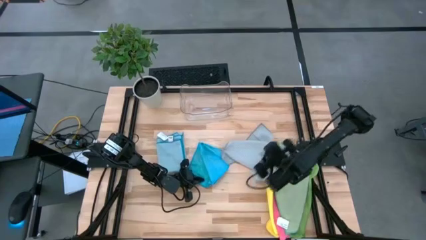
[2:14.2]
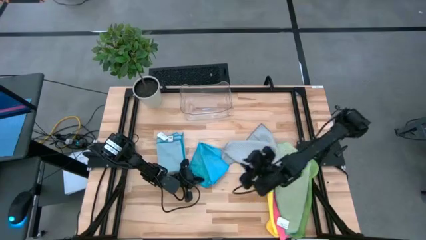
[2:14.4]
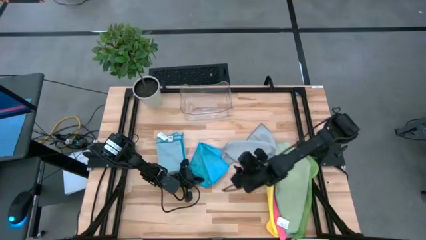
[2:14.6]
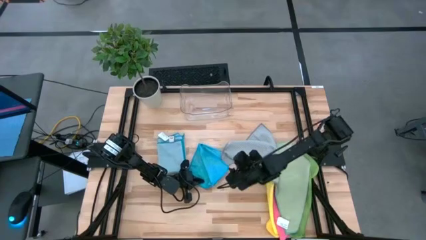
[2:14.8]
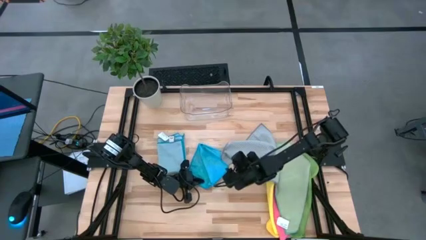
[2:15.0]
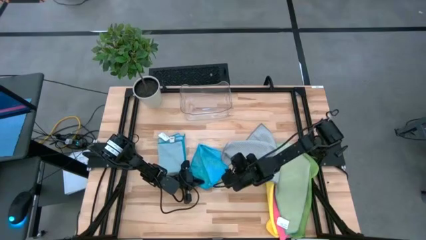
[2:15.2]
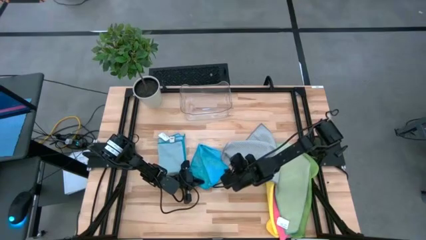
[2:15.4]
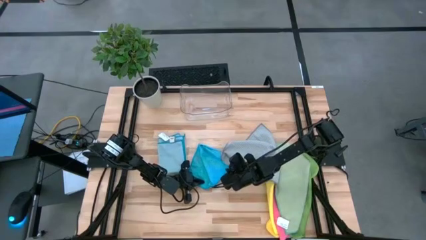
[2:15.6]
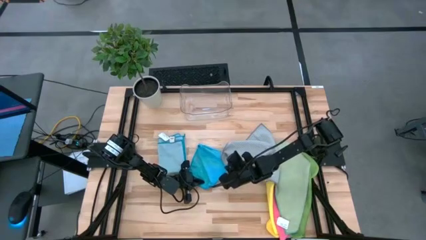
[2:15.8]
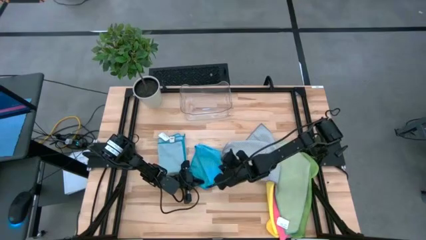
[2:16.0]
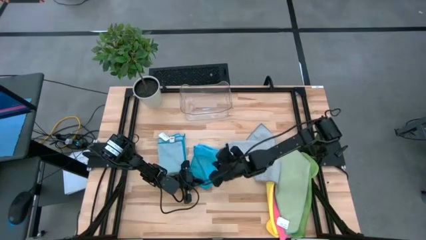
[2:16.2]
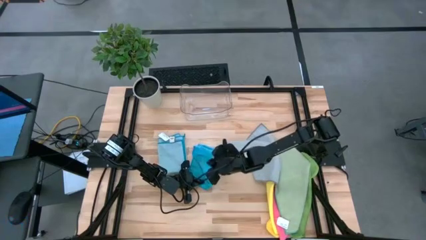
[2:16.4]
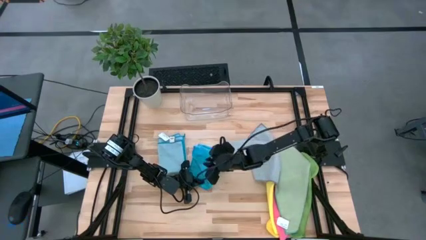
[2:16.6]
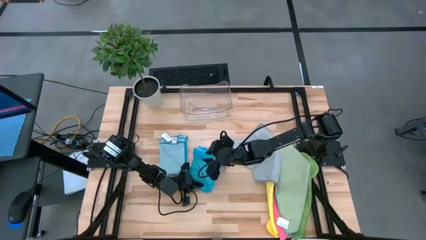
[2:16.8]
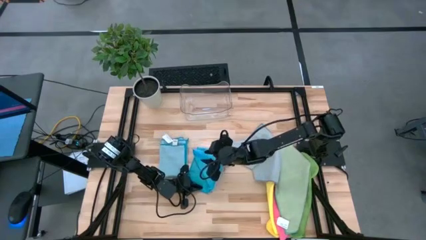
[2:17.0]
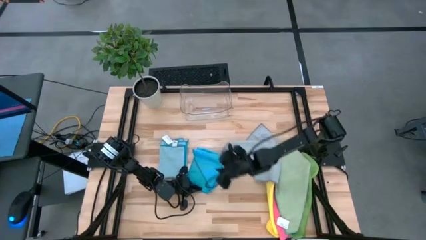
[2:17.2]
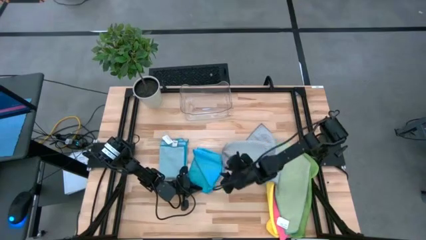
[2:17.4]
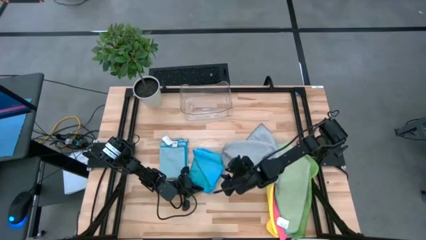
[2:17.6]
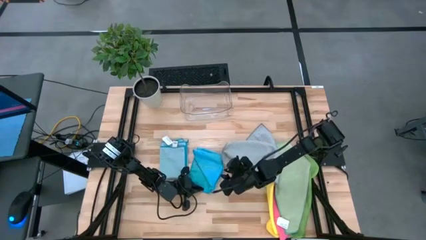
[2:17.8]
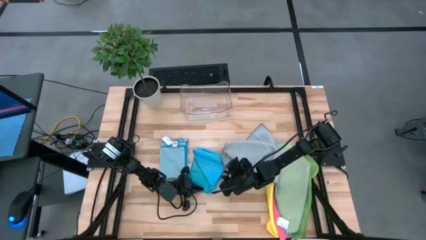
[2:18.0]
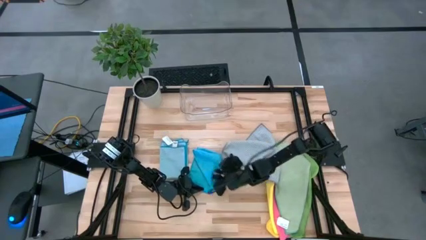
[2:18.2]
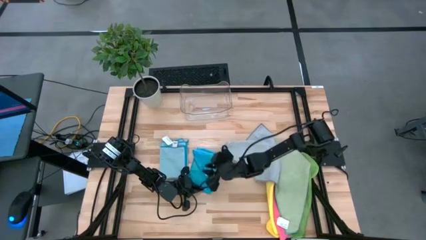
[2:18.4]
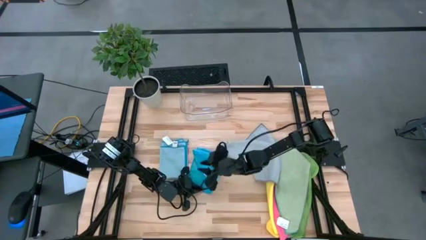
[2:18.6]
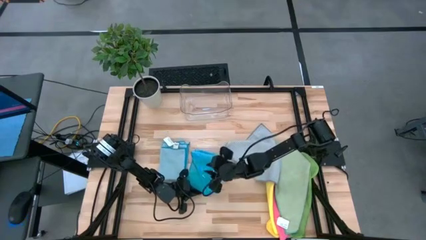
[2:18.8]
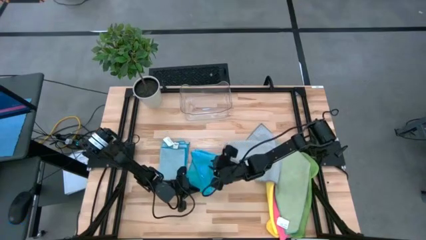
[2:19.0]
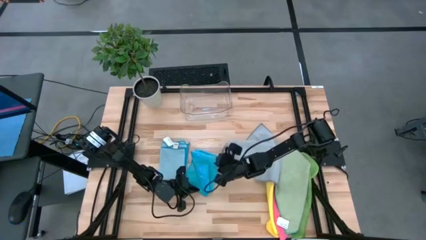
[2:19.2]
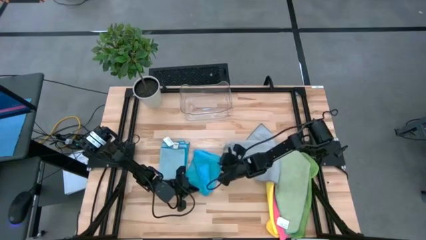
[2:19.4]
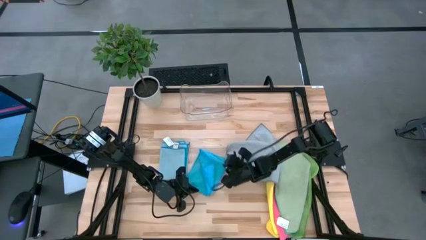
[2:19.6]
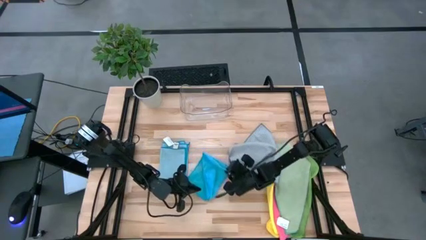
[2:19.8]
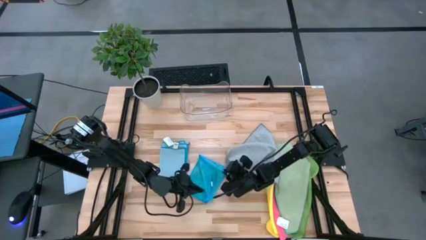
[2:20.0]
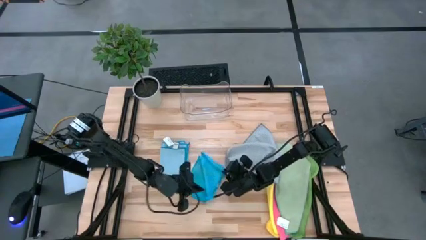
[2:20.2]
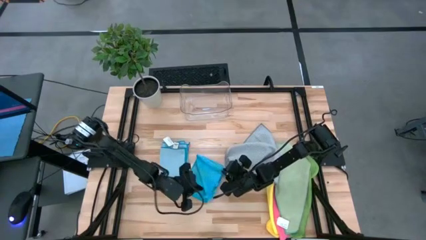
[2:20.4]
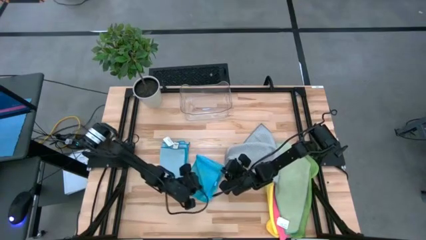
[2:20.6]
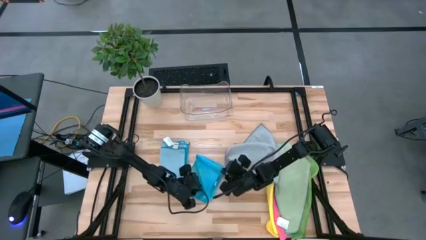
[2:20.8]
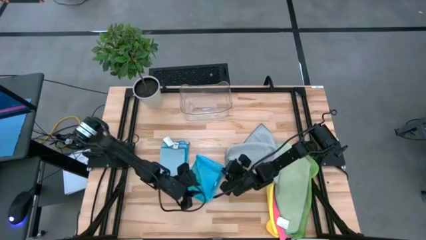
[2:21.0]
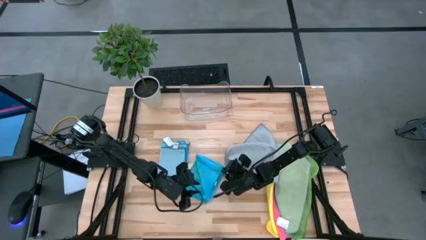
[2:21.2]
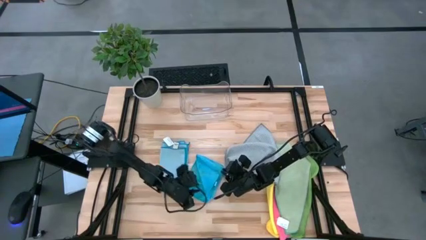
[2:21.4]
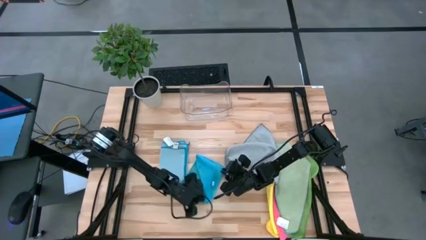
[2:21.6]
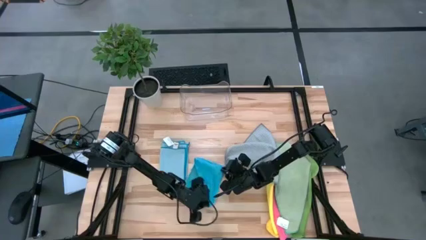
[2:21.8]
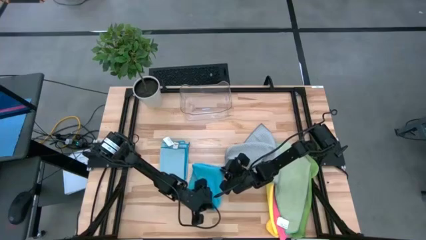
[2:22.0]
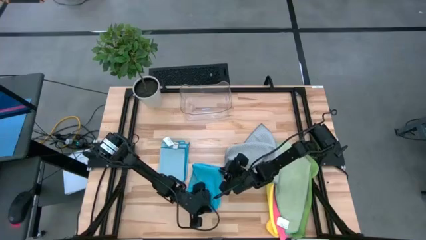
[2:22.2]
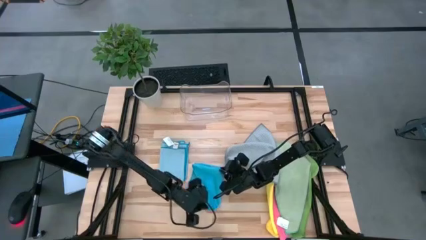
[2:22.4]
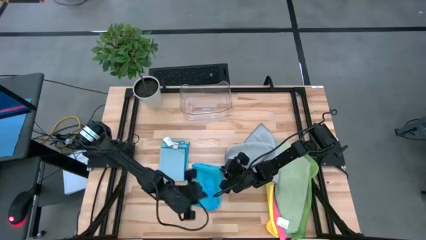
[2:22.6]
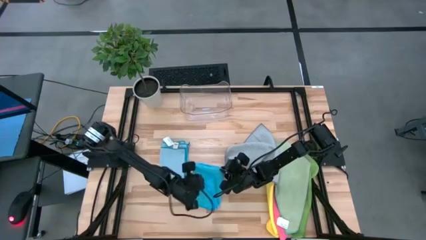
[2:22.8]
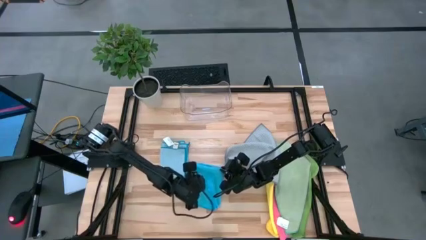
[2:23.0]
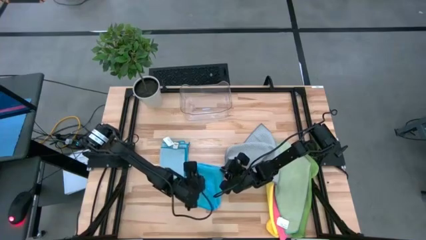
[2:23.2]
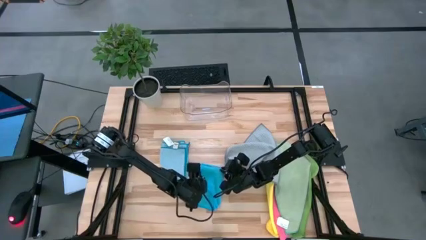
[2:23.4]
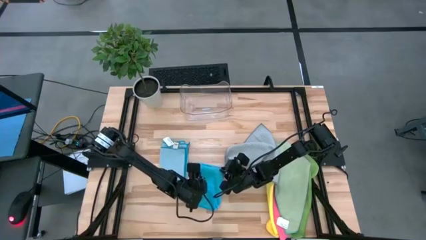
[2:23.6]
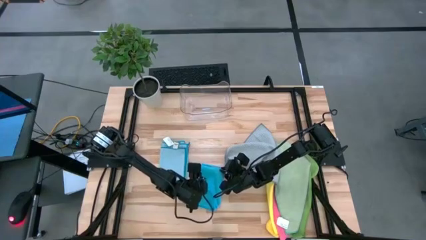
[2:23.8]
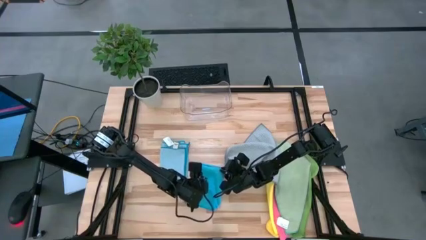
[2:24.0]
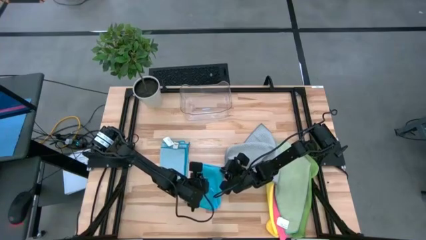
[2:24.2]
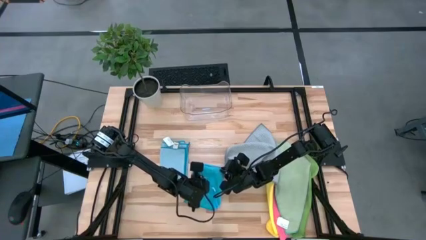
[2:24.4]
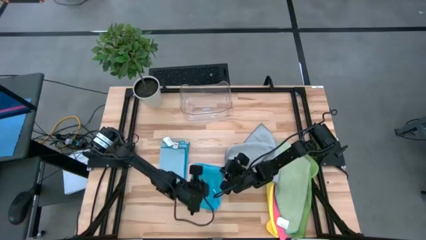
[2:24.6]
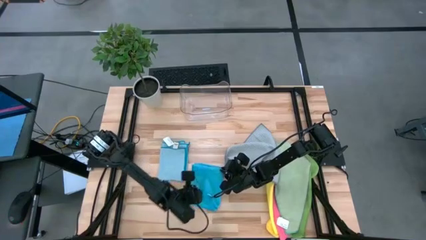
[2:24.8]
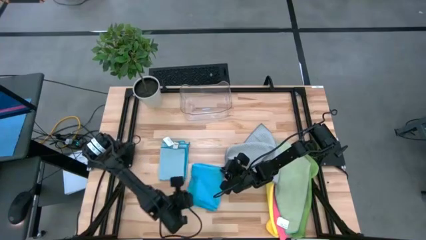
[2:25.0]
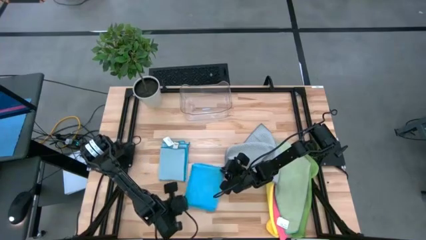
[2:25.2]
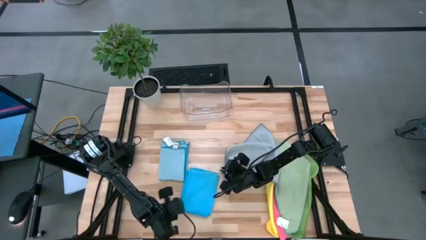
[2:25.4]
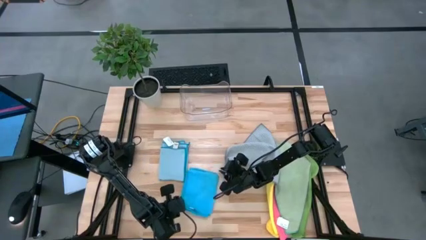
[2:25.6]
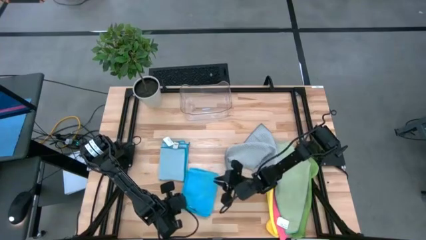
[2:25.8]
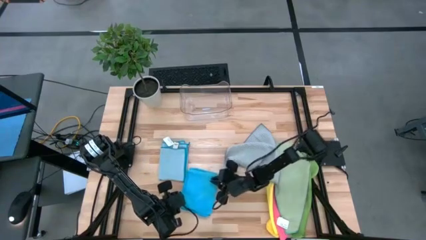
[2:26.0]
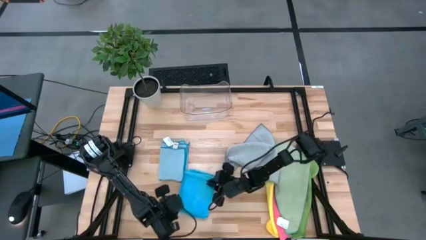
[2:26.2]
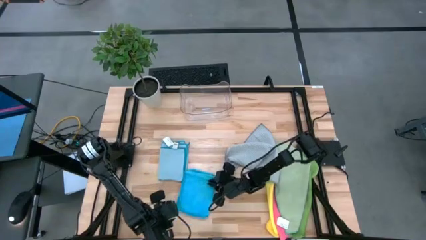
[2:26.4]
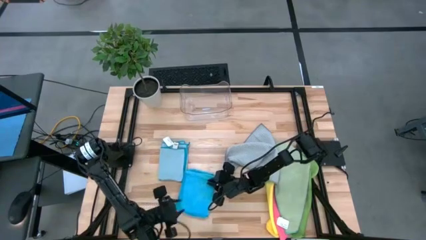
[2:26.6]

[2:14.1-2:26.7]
Task: Fold microfiber towels
Fold the blue microfiber cloth
